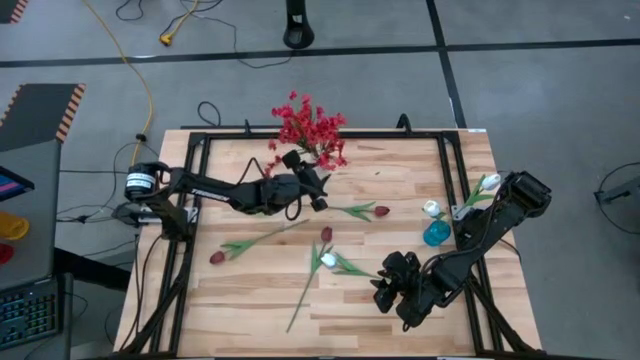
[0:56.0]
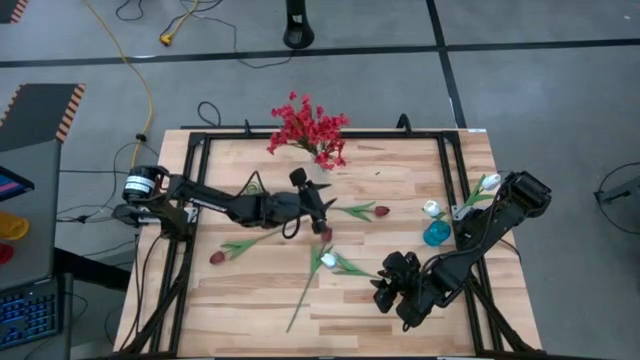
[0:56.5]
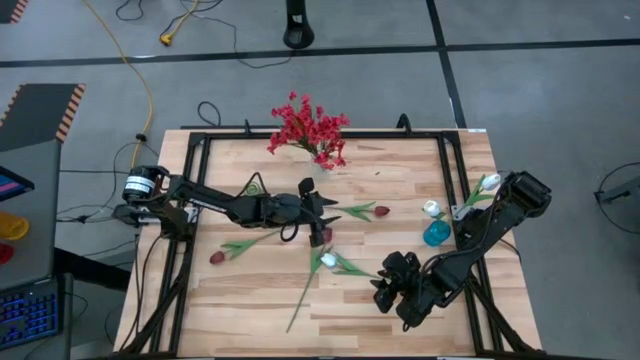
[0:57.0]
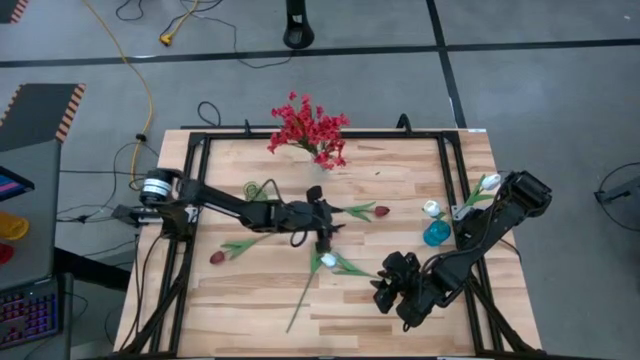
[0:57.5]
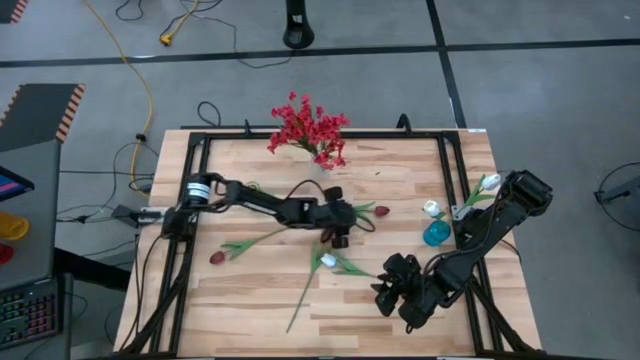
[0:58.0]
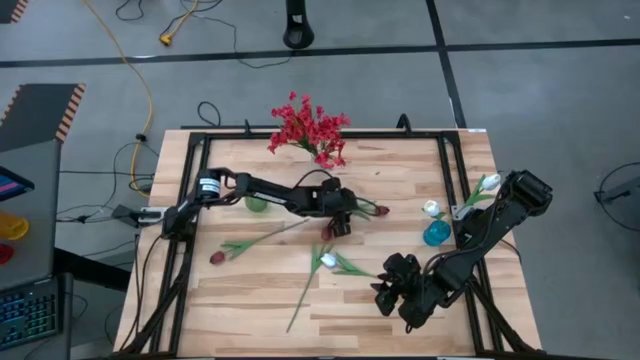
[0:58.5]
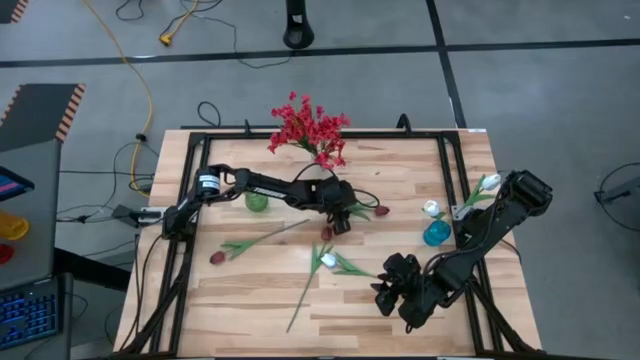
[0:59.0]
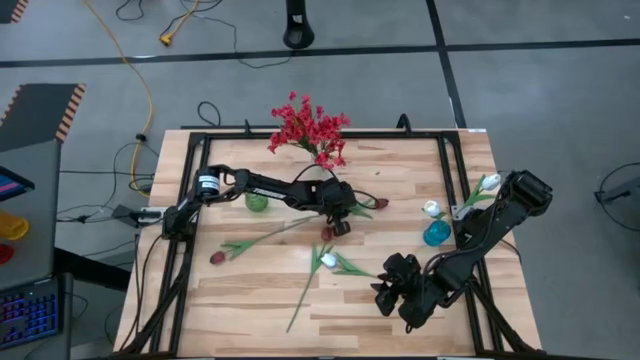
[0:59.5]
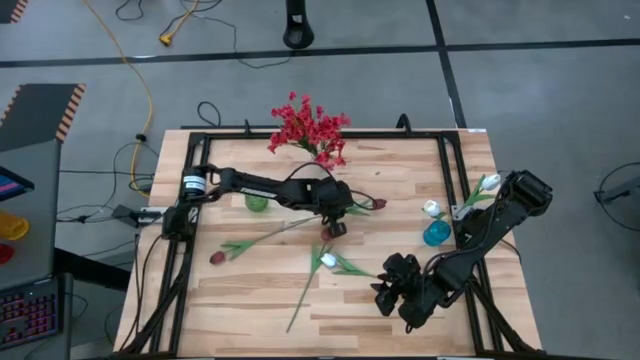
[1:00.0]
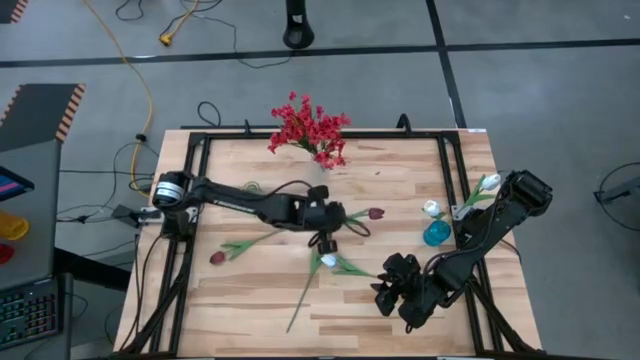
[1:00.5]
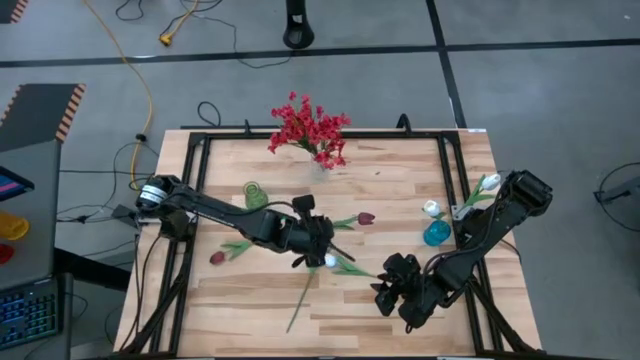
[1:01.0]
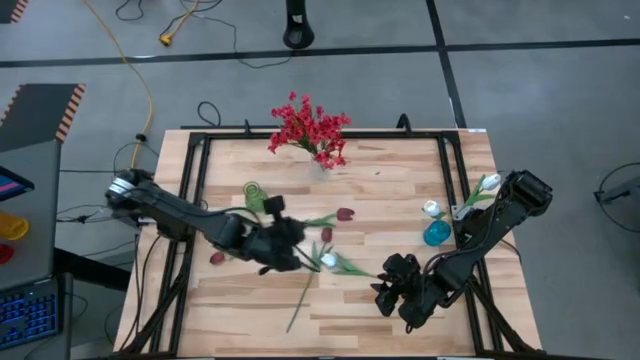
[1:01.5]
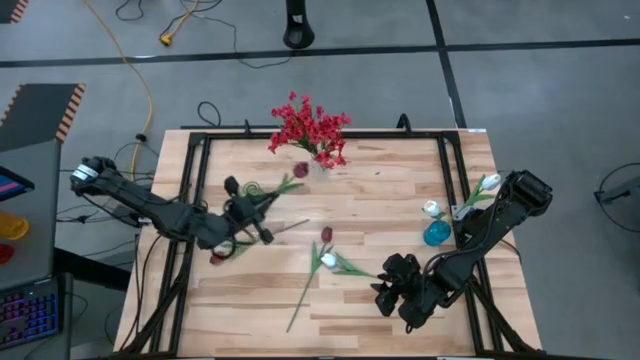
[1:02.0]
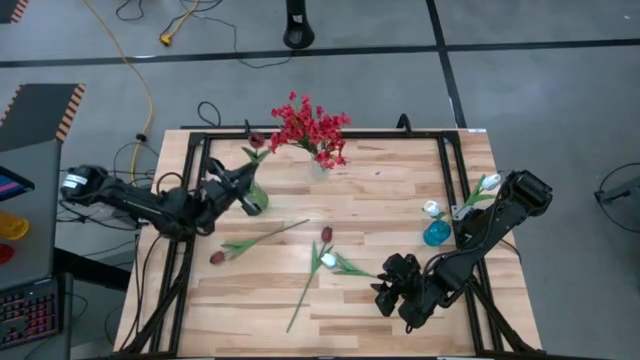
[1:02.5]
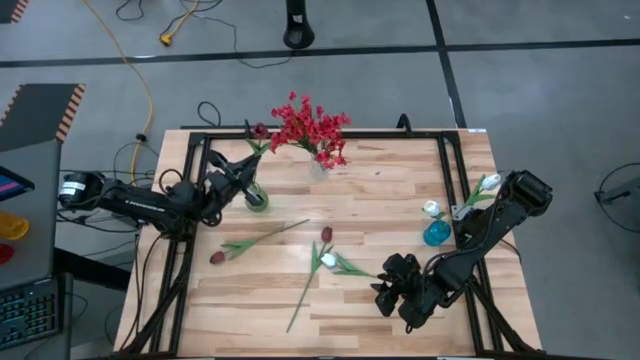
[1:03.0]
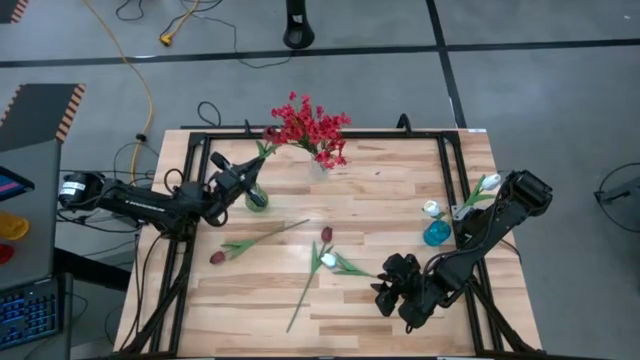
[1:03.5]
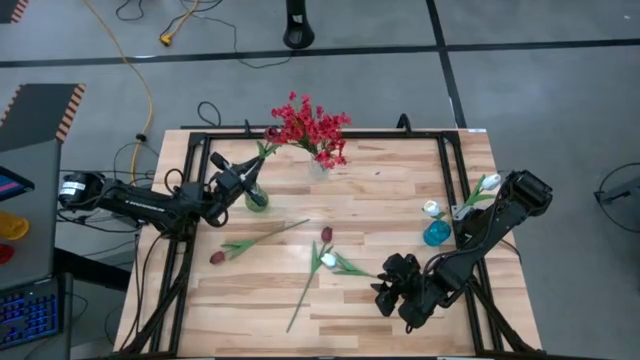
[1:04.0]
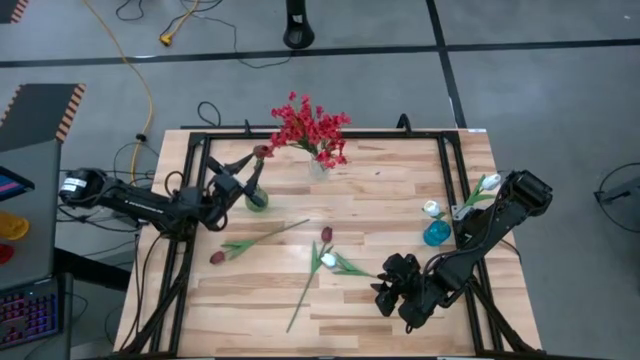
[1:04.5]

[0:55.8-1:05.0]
Task: Sort flowers into vase by color
Put the top dark red tulip into the green vase

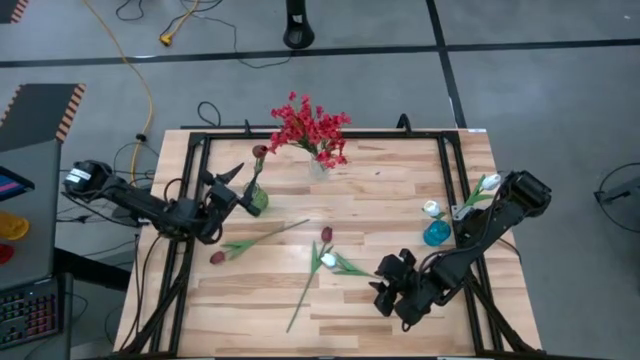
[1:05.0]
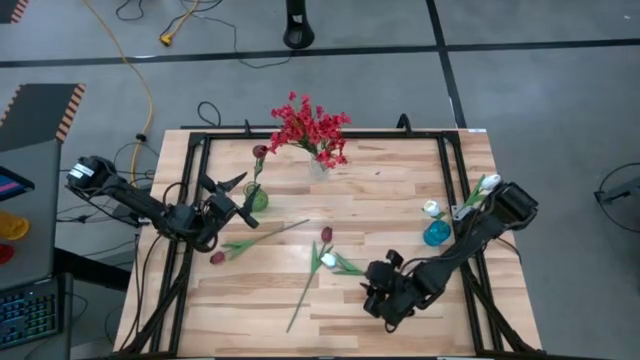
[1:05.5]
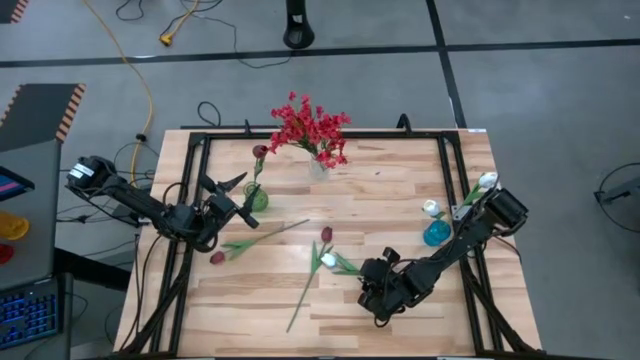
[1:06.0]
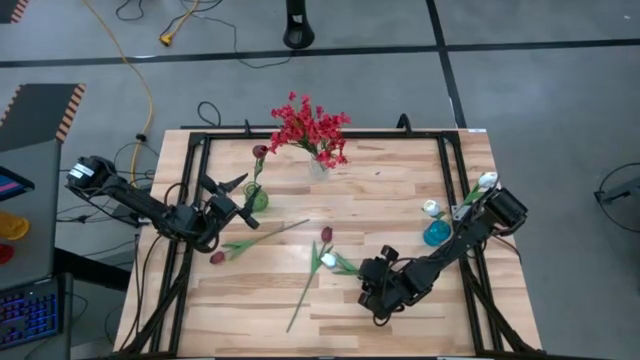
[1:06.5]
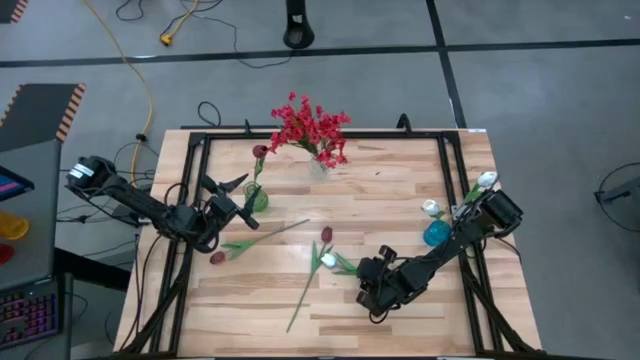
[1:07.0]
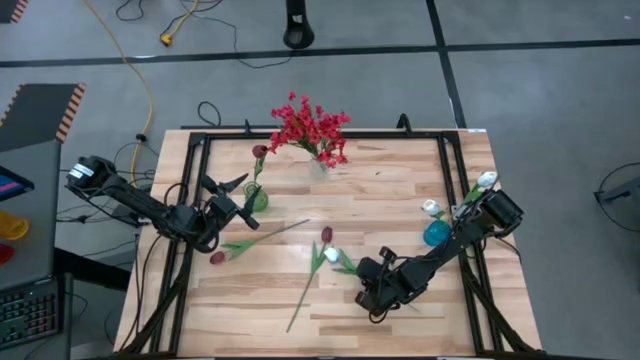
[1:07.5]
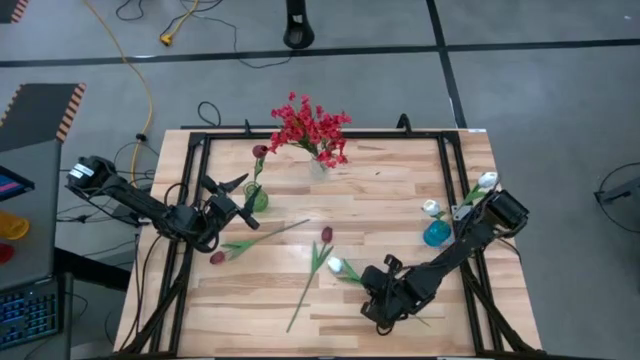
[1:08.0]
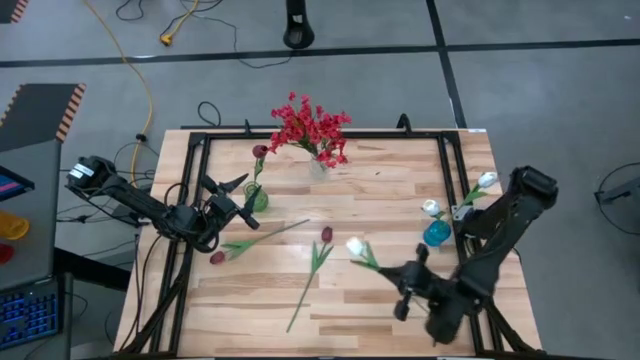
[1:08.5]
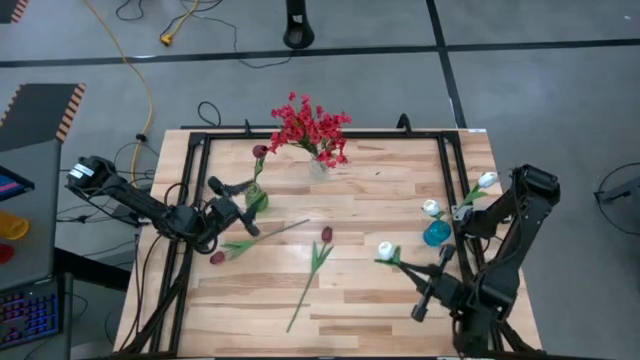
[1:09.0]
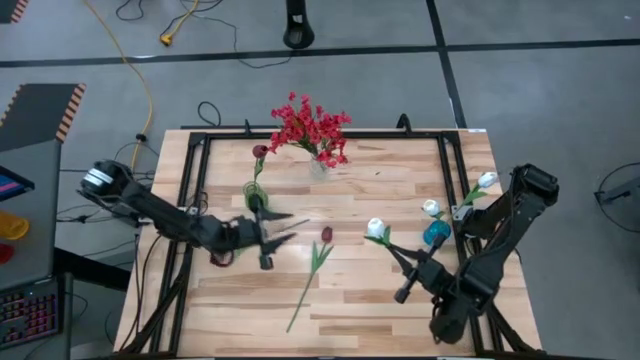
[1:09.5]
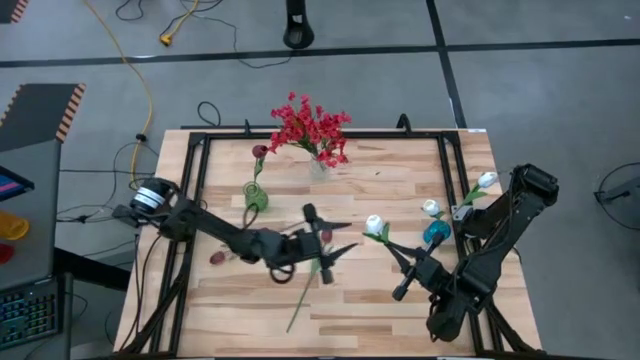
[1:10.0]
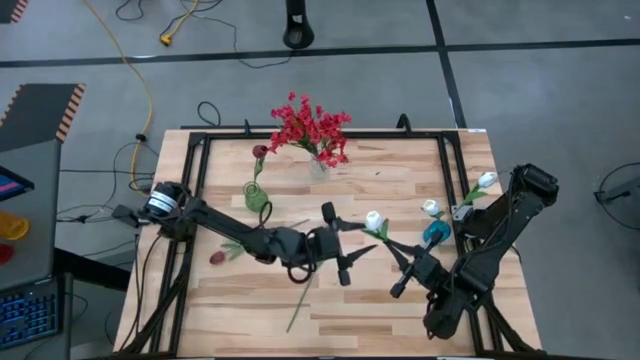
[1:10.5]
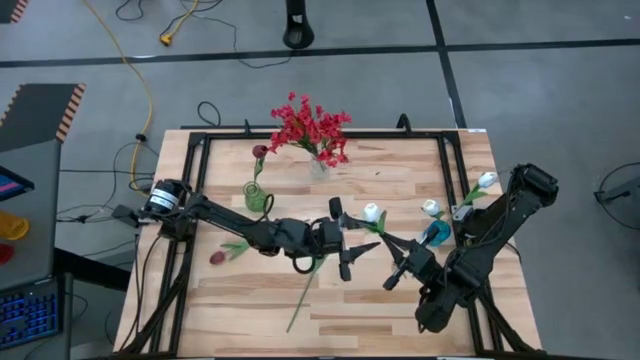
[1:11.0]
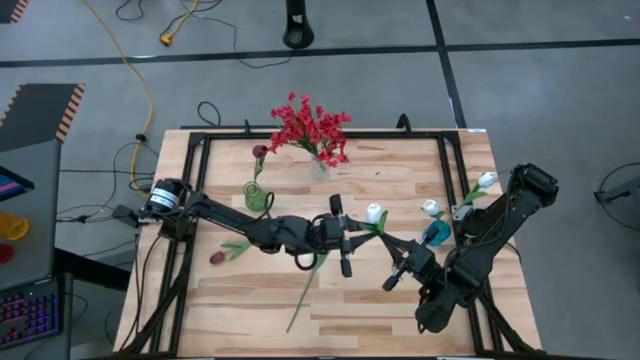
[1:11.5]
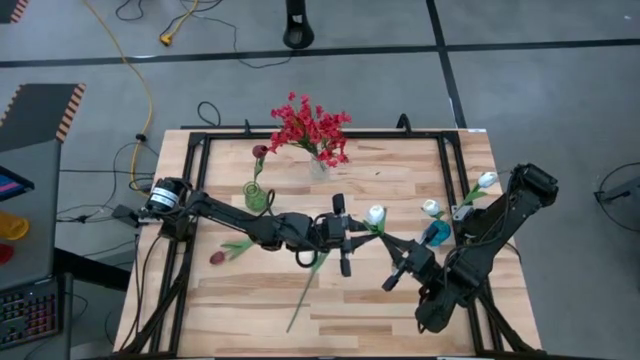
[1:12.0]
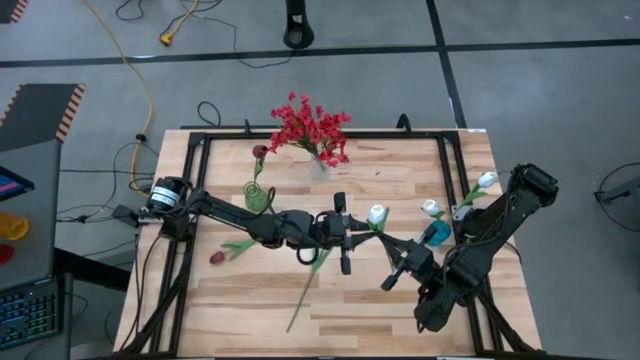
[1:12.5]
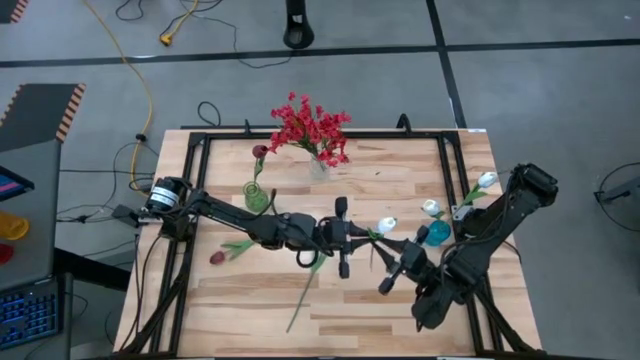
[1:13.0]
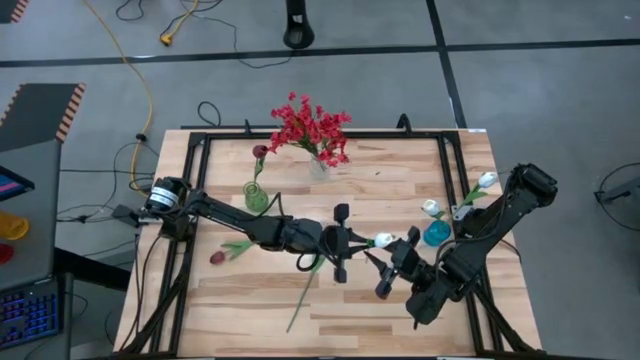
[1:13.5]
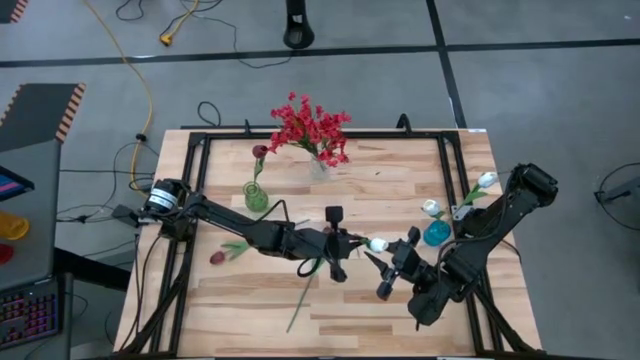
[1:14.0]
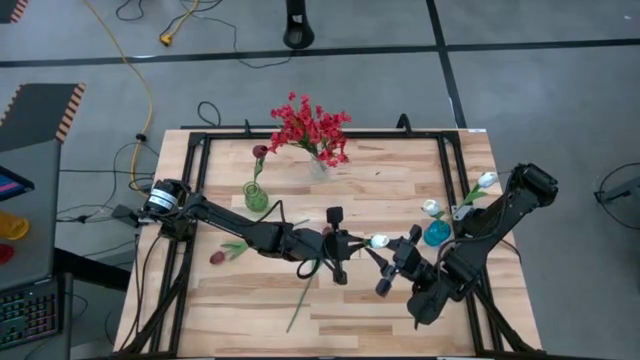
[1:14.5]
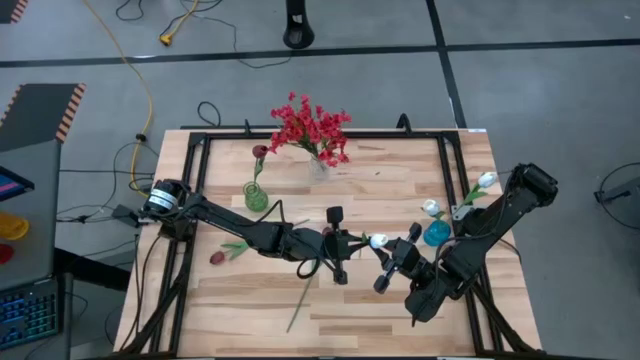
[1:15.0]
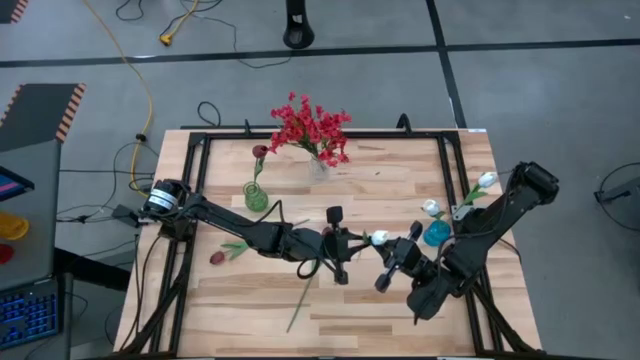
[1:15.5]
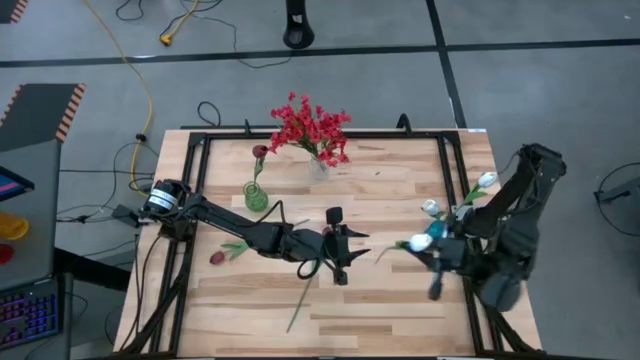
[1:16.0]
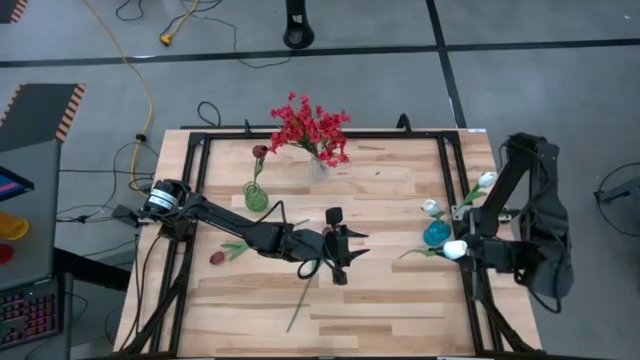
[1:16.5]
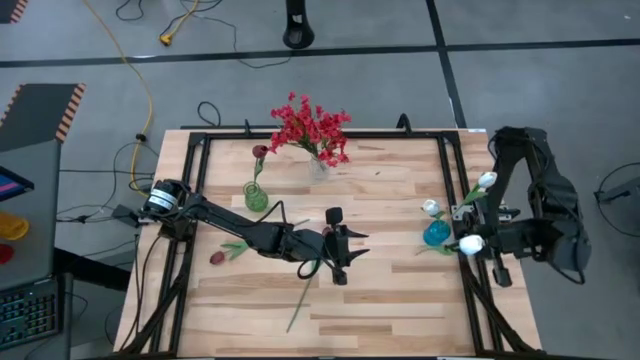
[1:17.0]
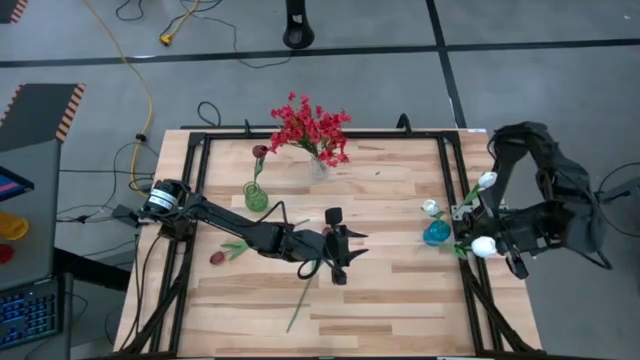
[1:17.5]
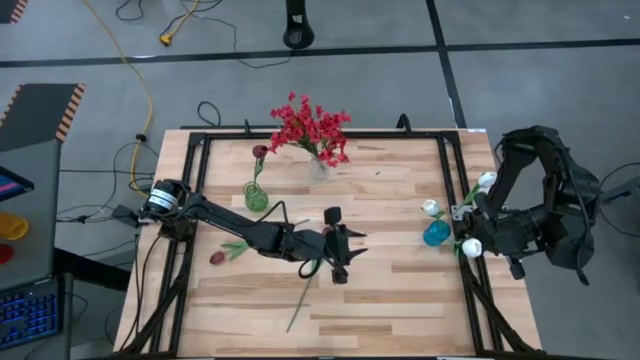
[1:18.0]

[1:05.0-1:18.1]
Put the white tulip into the blue vase
